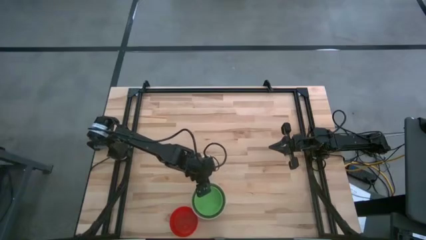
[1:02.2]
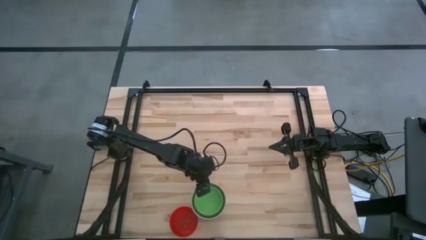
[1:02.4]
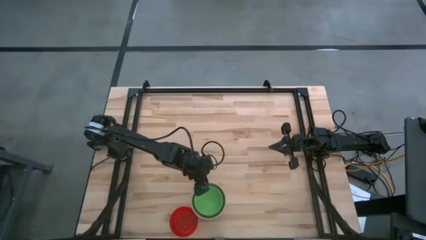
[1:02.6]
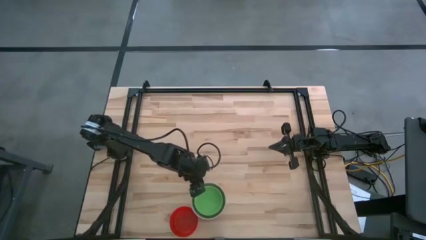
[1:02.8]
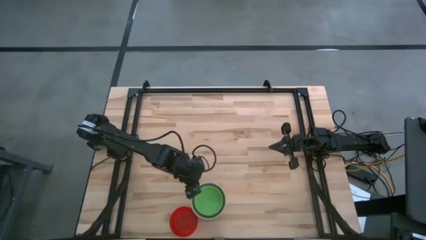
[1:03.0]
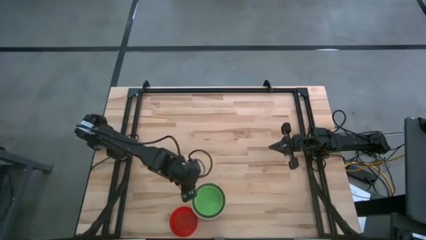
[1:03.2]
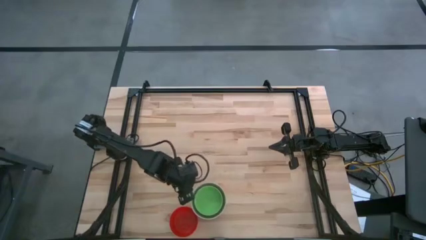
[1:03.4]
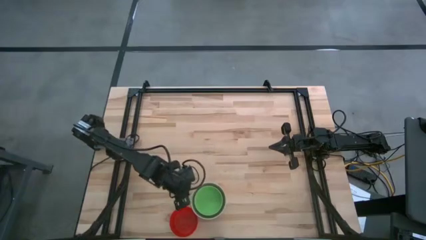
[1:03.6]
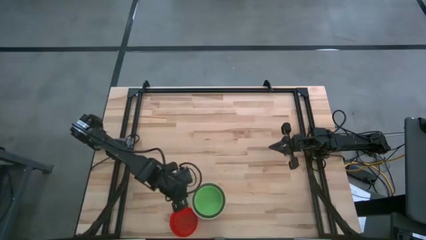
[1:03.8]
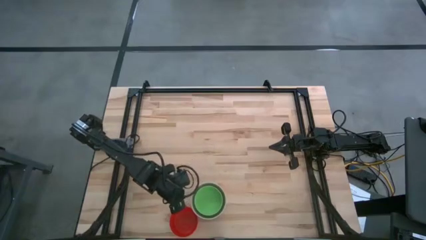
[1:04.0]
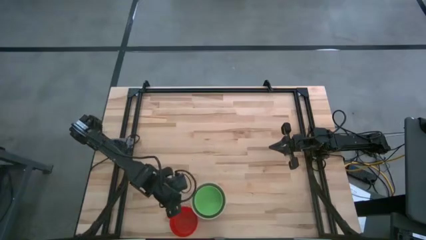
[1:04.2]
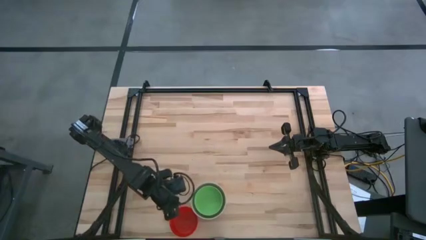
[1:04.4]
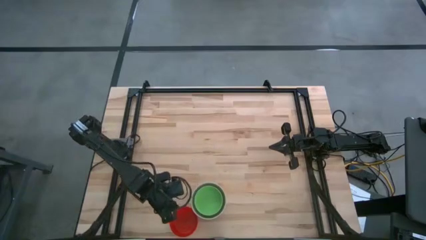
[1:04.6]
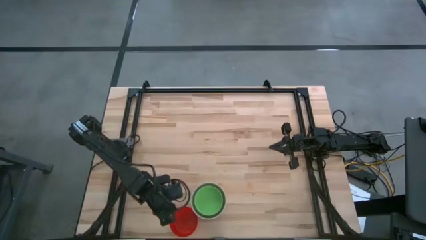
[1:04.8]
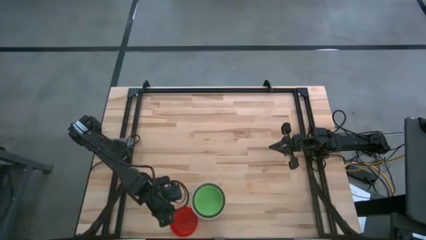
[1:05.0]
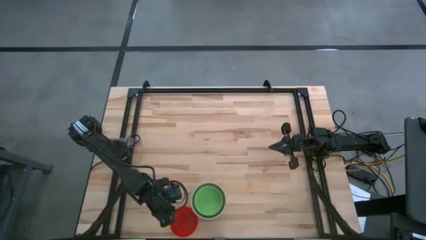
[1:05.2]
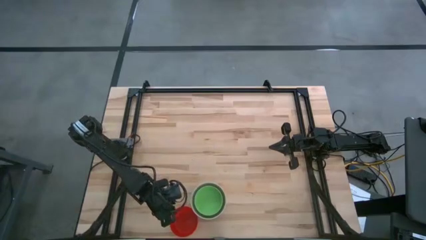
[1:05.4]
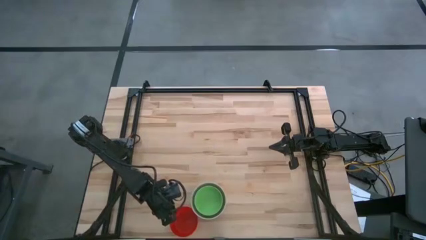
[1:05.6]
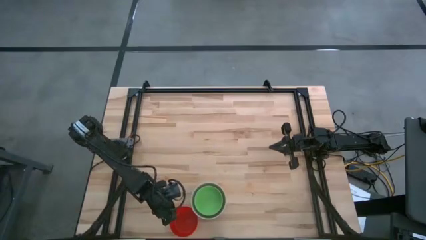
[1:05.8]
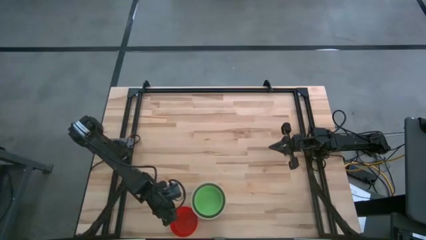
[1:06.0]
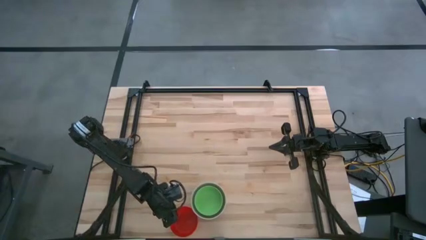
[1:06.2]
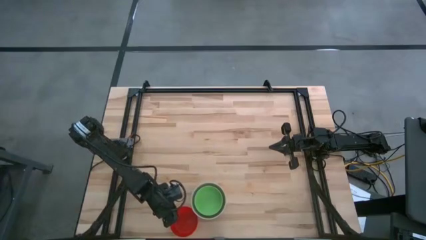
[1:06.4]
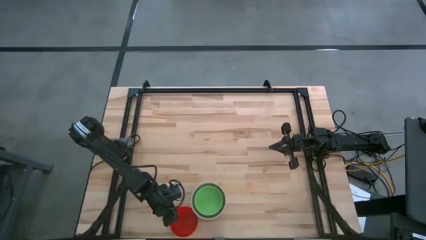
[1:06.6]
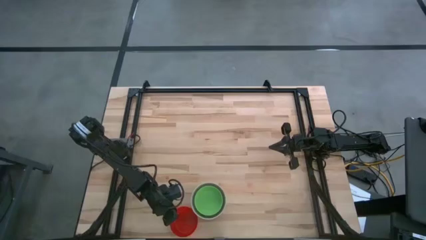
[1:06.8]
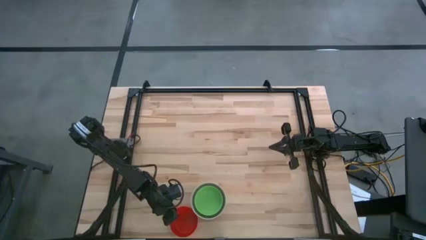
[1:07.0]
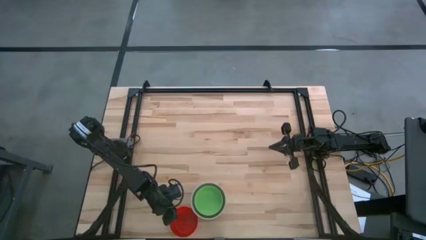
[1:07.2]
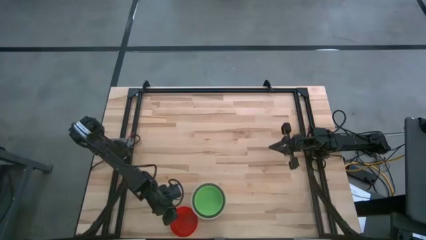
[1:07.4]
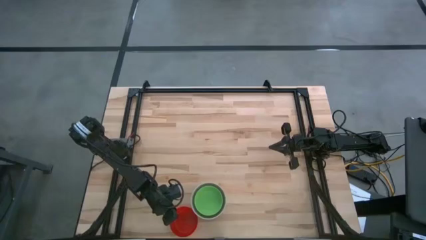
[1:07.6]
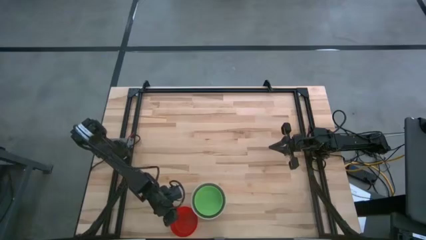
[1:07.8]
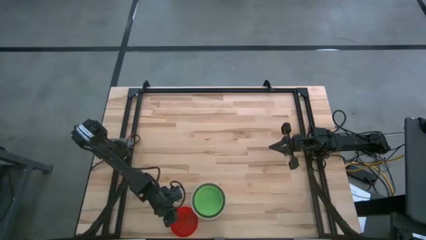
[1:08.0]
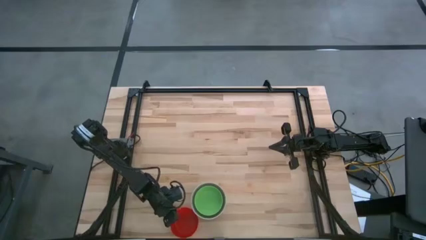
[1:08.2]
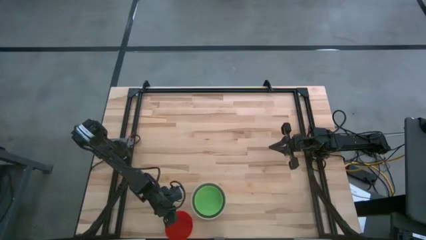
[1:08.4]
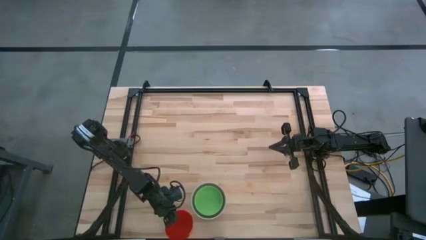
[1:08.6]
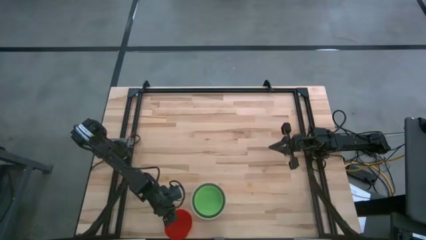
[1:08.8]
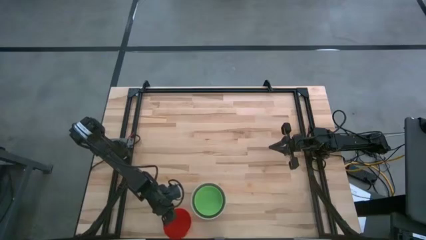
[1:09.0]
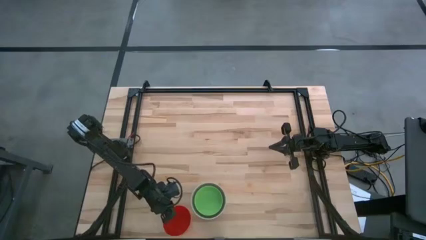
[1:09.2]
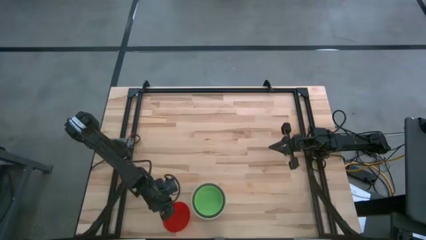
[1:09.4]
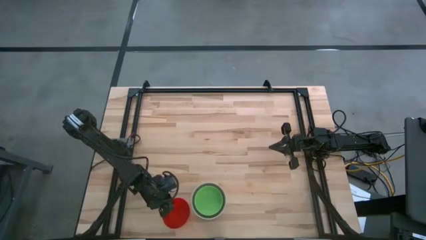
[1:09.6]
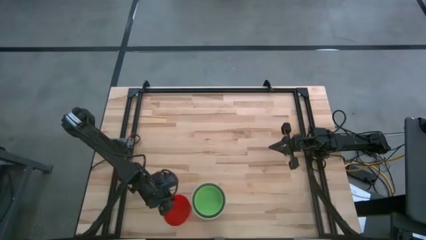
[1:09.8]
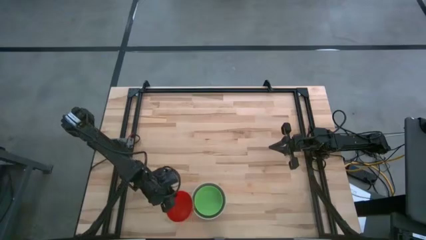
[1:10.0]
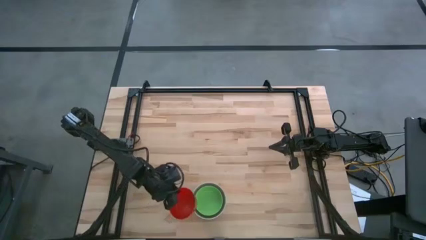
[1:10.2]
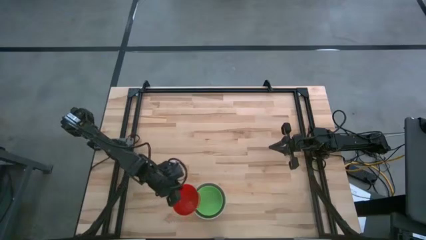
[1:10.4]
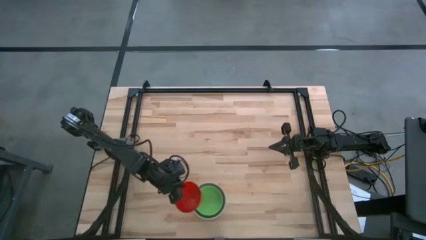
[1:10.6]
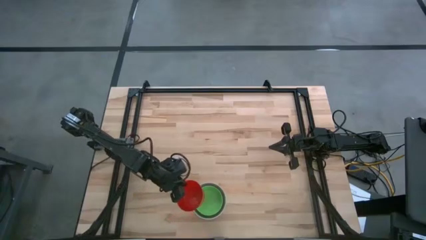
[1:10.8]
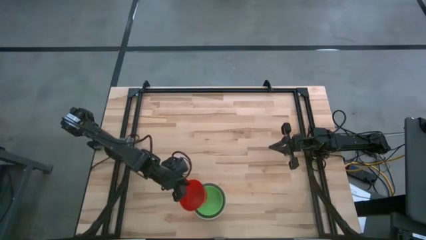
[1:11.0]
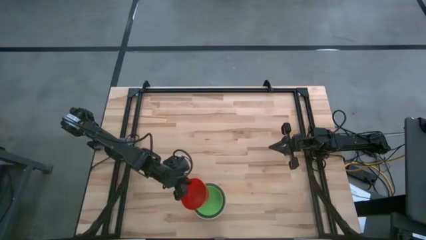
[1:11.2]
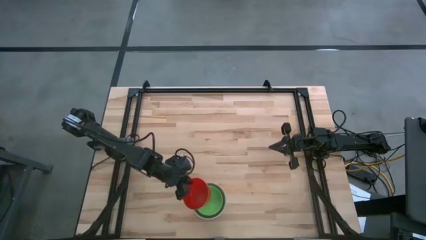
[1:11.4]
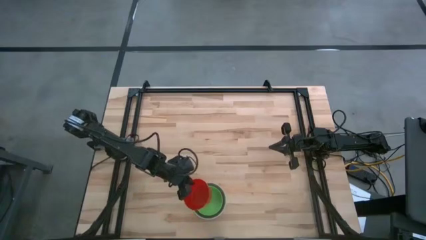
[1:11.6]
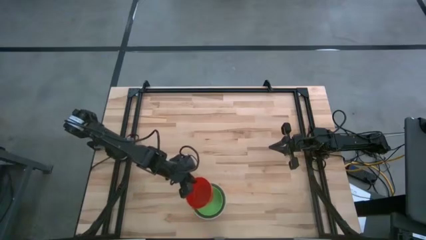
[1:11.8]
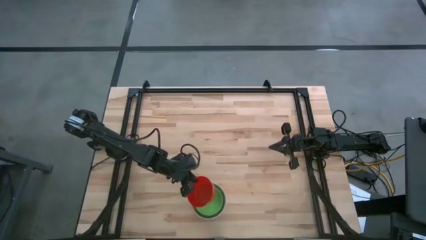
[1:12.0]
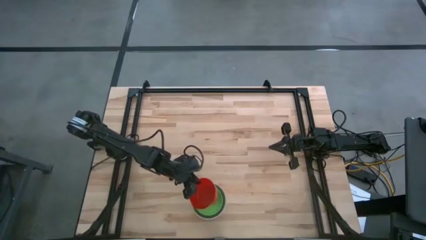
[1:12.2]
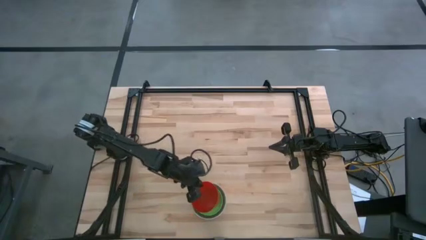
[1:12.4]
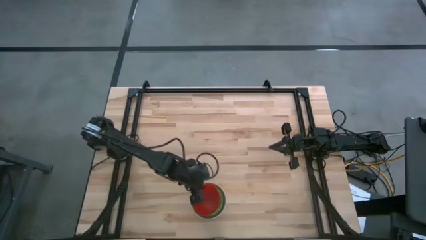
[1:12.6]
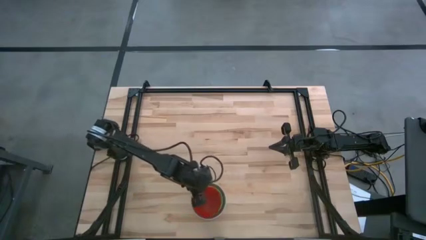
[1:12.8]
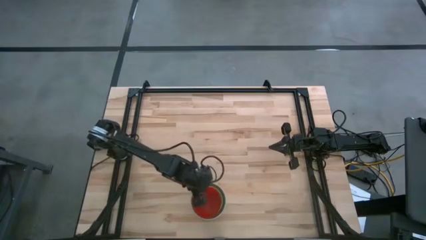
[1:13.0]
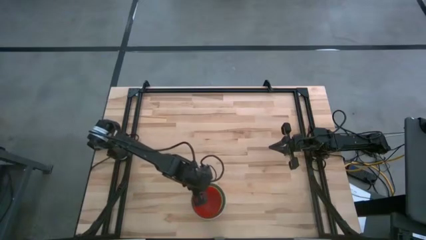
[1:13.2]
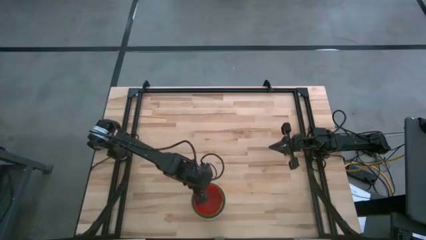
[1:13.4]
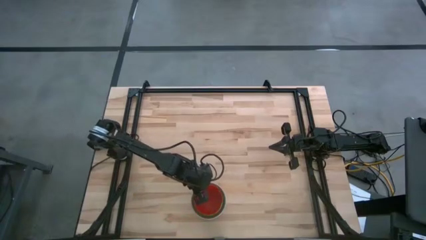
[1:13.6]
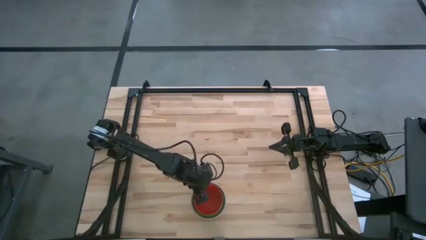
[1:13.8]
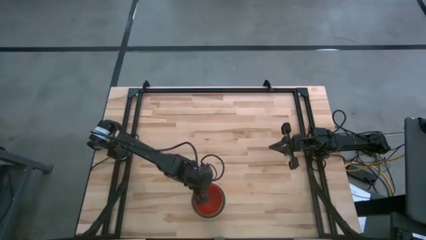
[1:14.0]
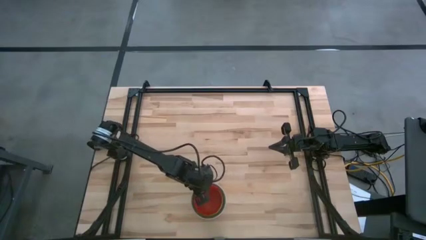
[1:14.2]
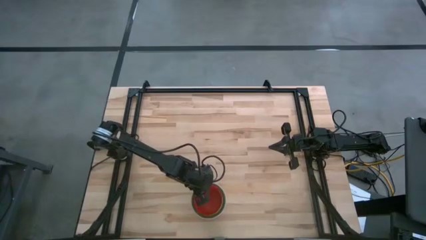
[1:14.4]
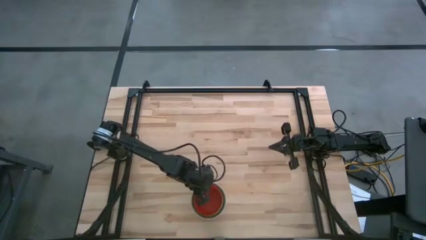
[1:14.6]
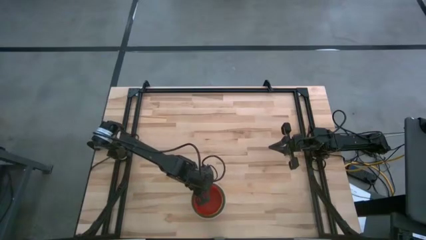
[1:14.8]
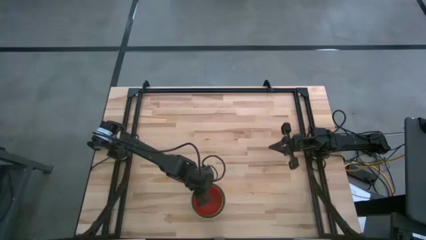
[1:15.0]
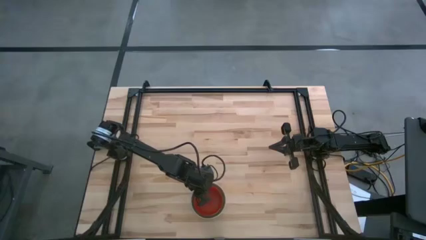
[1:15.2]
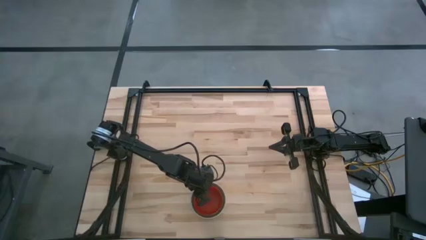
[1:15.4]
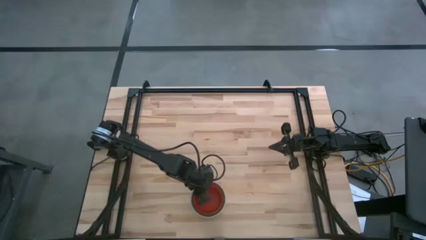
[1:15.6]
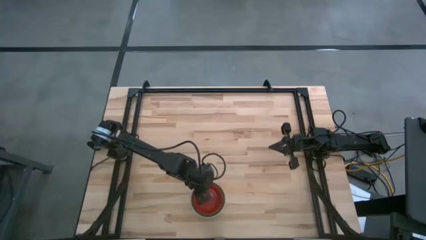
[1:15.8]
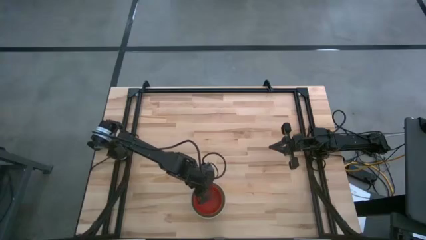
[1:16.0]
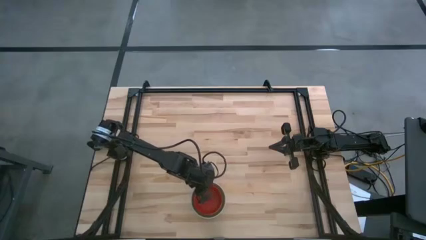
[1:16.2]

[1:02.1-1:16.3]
Stack the red bowl on top of the green bowl
